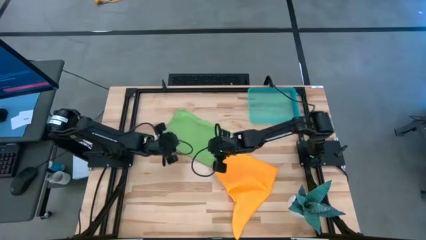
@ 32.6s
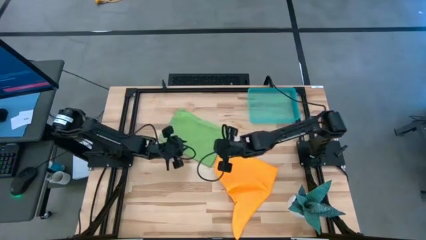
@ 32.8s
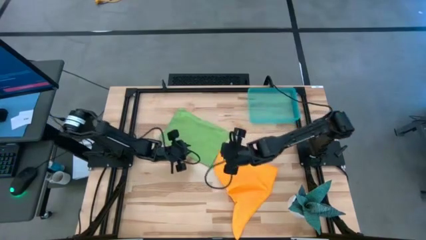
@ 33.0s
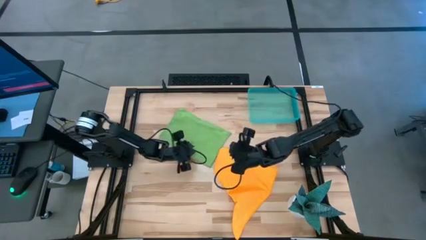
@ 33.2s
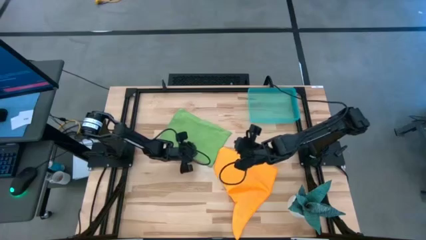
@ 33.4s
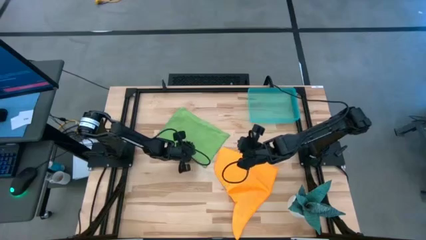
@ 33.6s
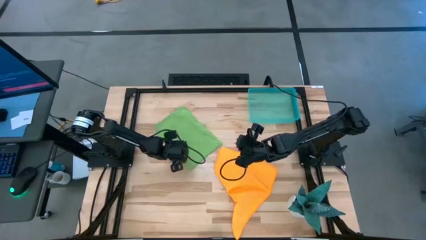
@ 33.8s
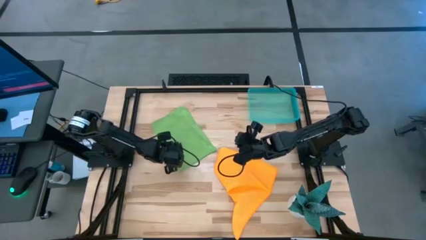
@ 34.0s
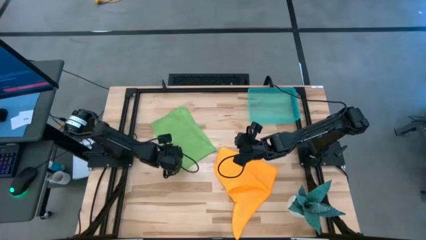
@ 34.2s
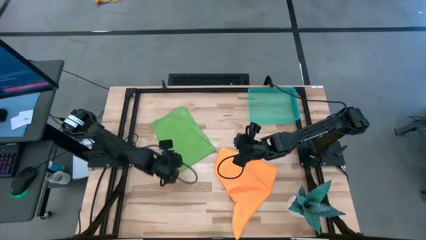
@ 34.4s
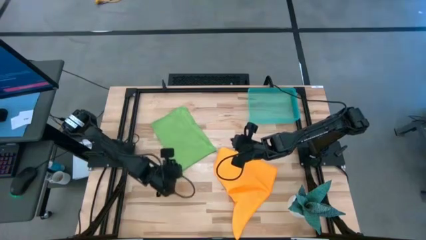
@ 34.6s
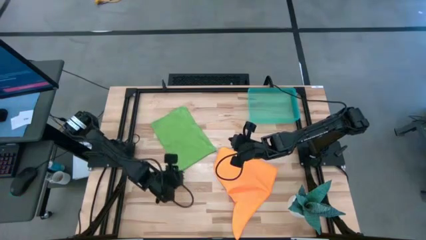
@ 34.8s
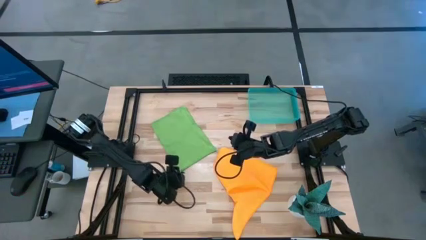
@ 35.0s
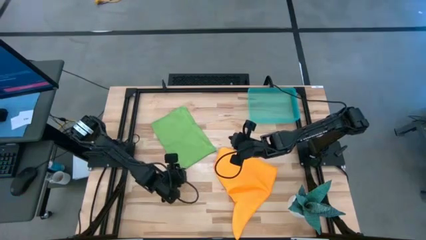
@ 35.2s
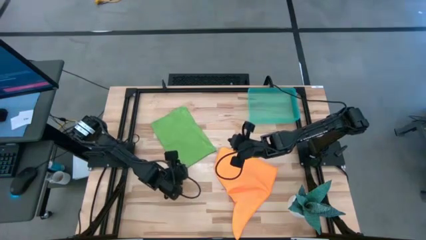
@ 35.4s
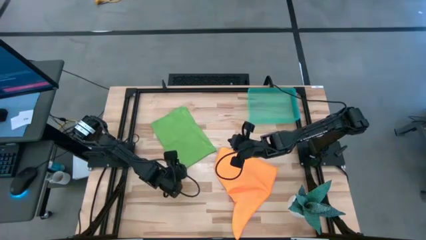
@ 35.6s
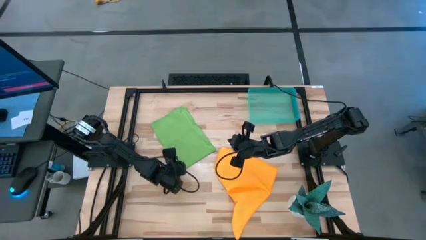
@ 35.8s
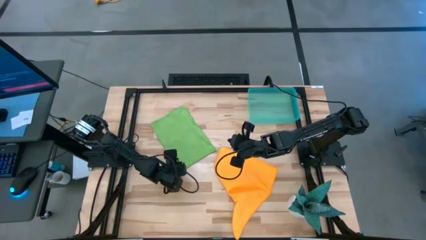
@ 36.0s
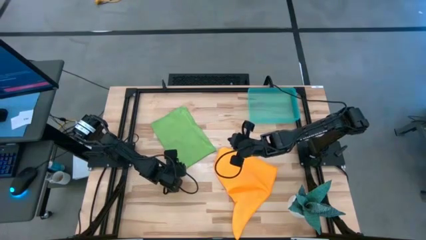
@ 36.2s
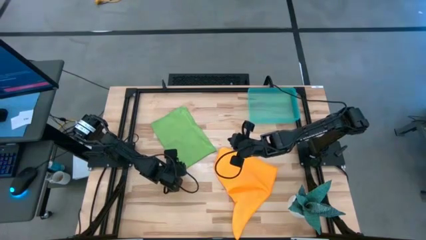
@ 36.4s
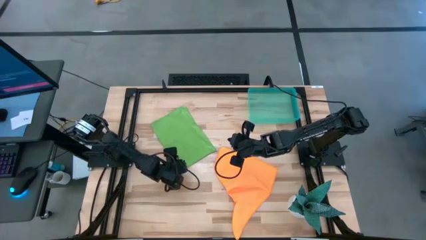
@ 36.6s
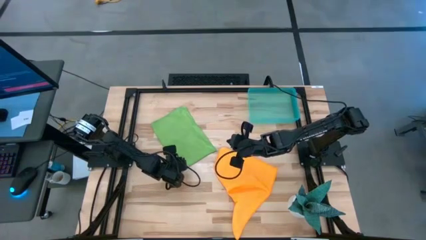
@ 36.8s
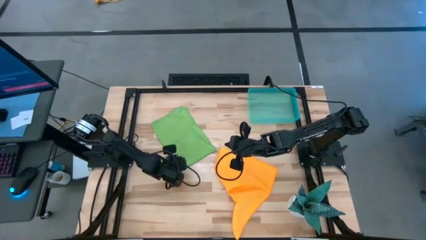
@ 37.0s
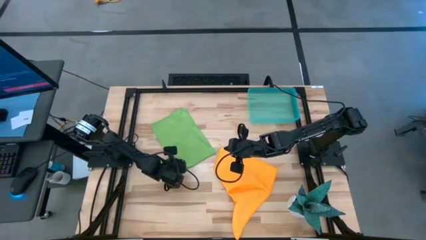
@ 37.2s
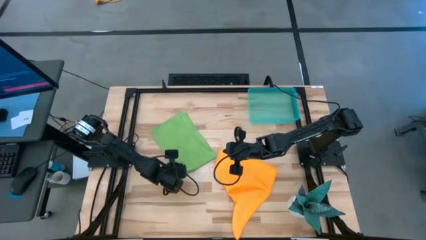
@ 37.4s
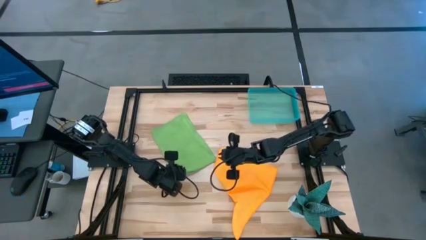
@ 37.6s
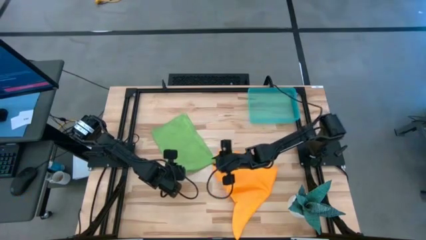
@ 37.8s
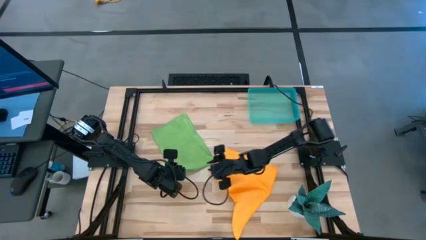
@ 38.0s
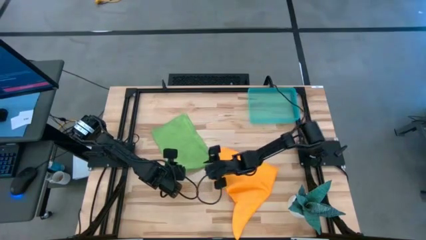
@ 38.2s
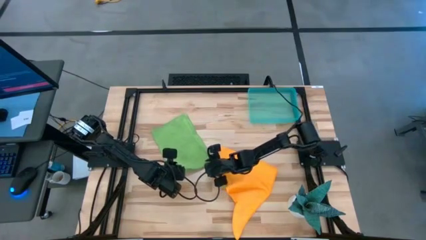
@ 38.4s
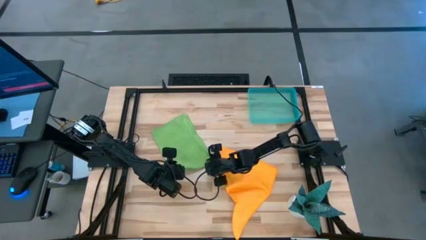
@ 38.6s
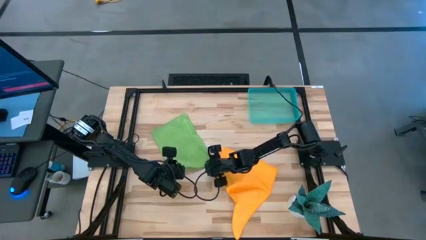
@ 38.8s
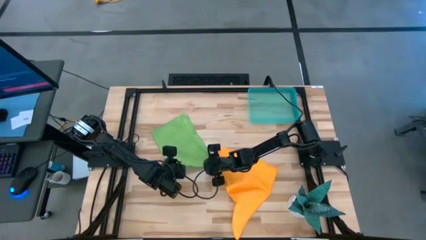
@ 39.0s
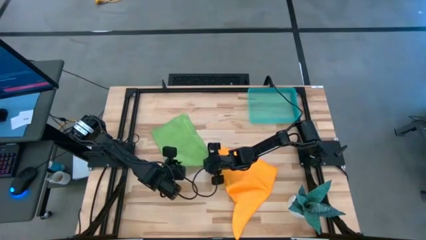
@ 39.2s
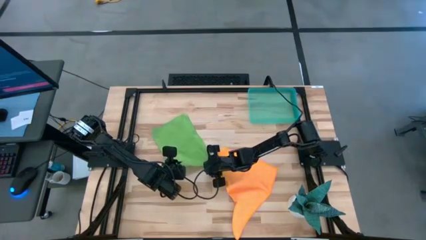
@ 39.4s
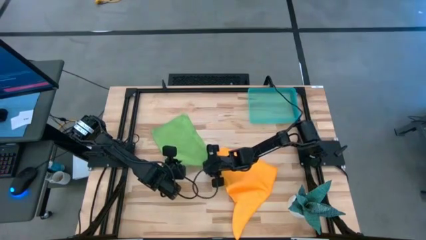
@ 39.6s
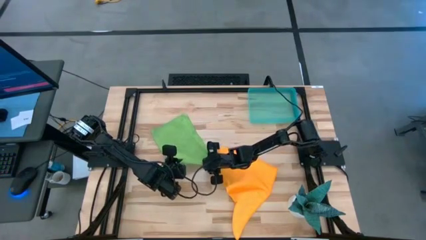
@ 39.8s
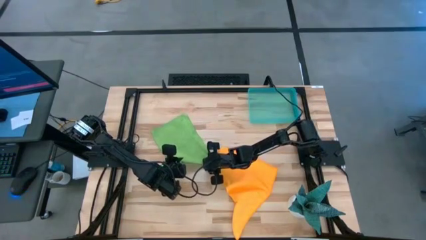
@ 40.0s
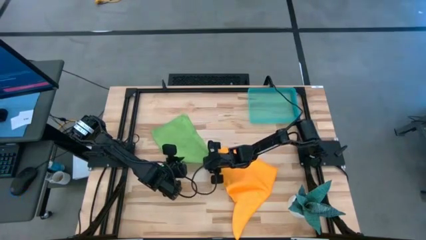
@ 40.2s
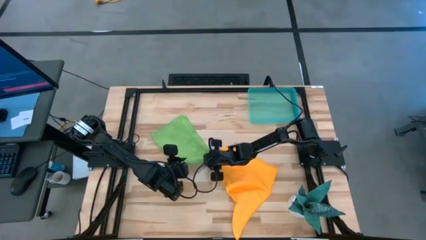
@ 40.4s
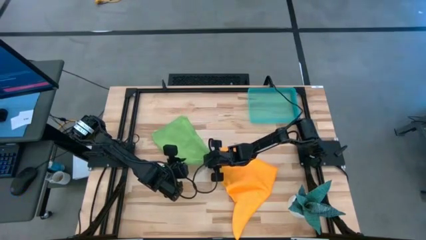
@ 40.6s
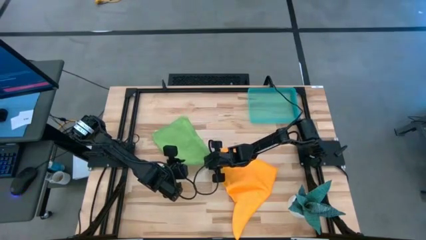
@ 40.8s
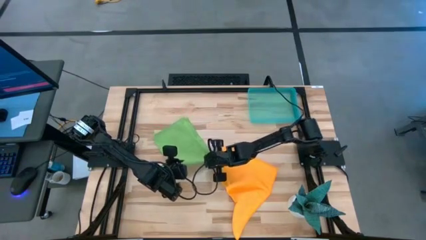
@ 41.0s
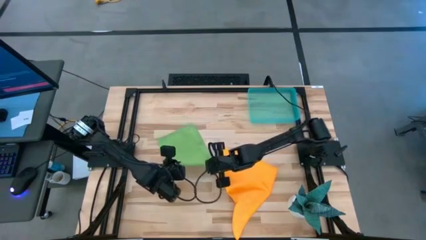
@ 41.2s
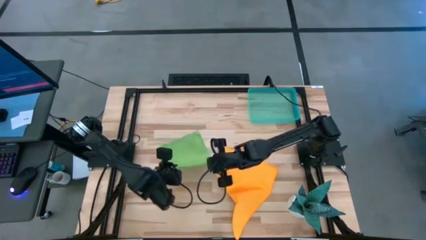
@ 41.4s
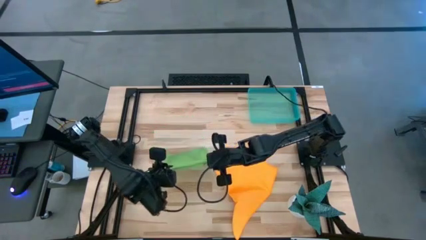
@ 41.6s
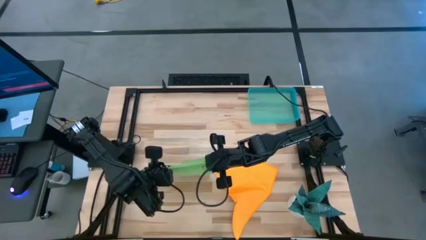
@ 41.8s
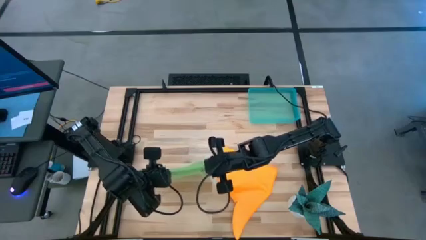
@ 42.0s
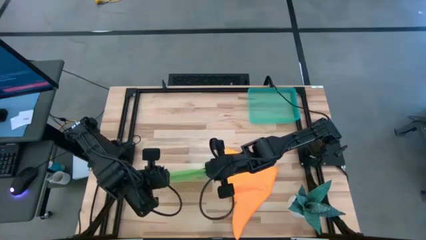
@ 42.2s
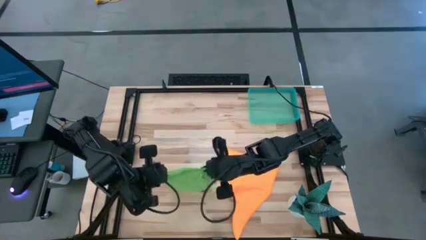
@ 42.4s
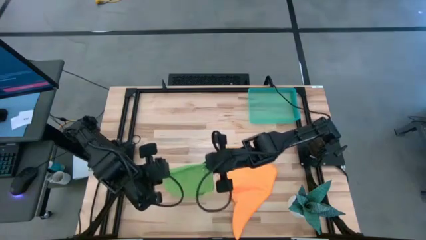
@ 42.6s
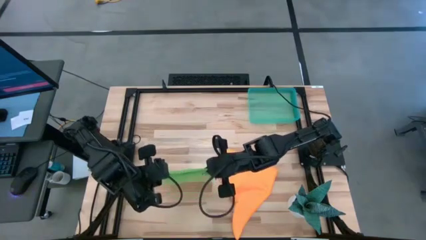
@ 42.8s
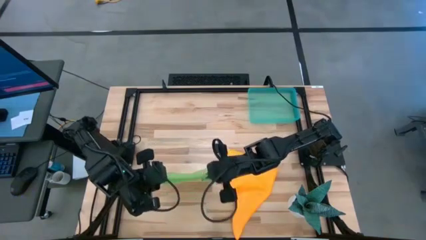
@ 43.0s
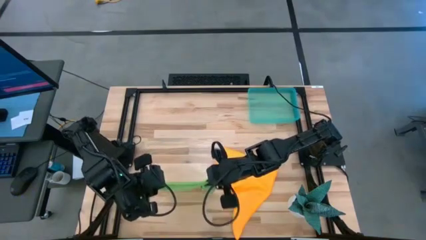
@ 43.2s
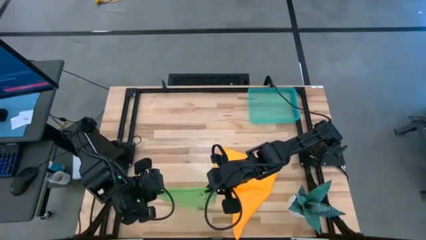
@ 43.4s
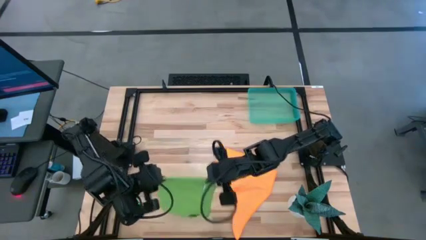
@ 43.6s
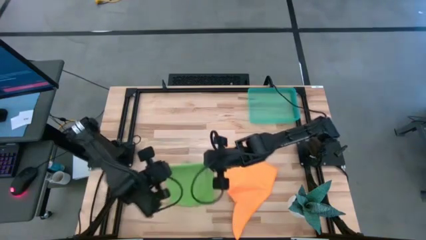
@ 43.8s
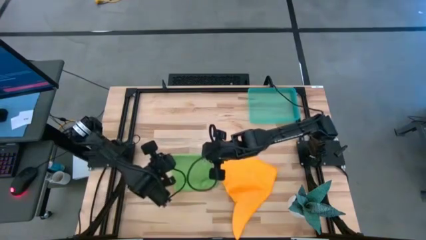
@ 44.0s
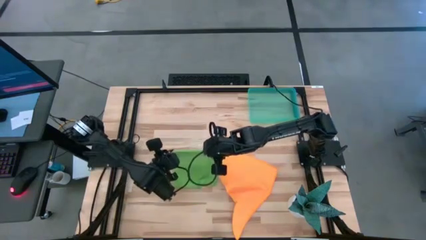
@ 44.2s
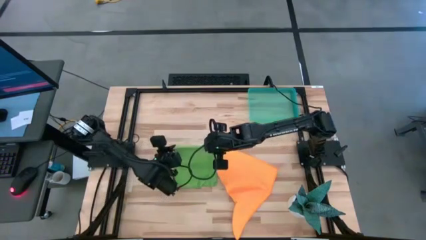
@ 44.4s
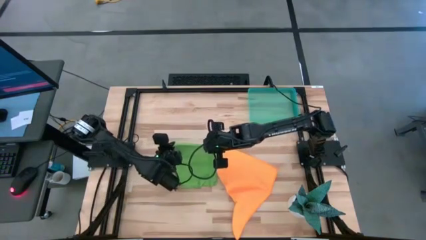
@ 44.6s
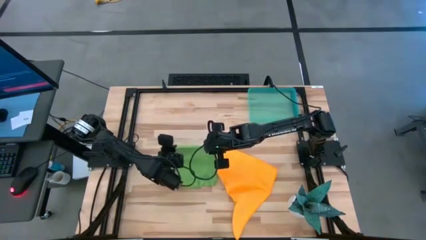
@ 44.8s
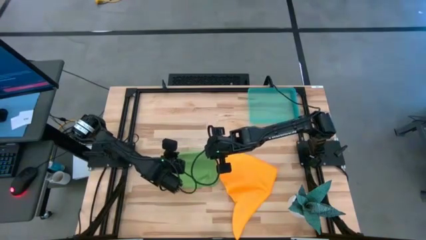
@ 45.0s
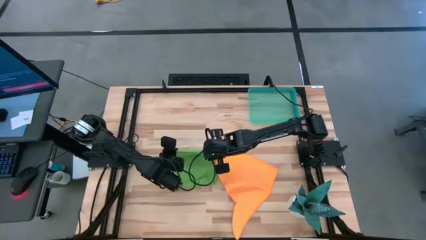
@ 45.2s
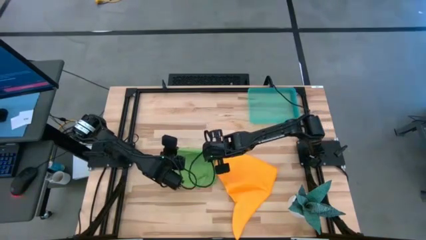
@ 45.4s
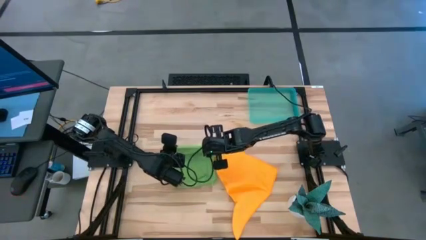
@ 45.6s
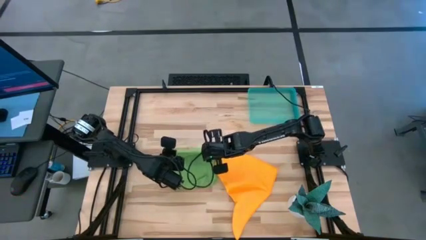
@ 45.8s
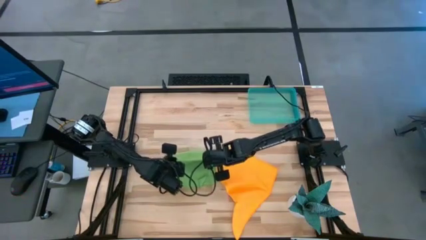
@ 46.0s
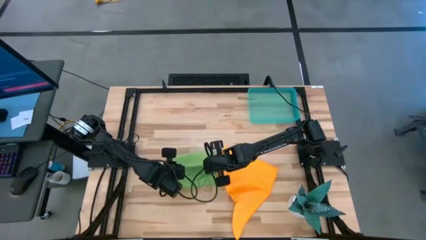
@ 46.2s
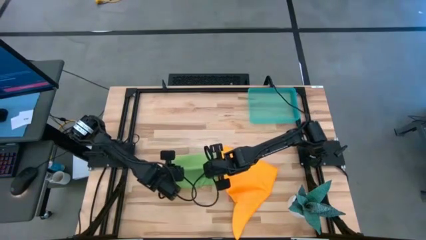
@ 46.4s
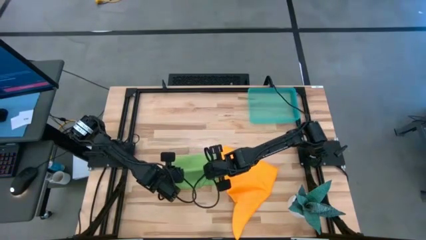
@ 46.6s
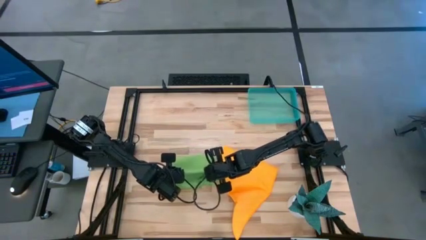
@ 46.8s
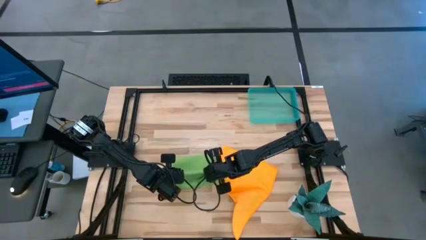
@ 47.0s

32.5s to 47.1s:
Task: Roll microfiber towels into tight, uniform cylinder then place into a basket
Fold the green microfiber towel

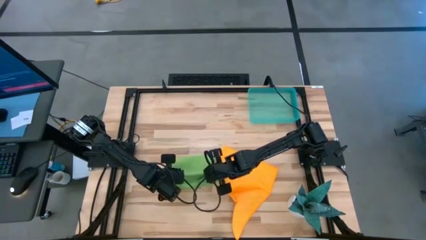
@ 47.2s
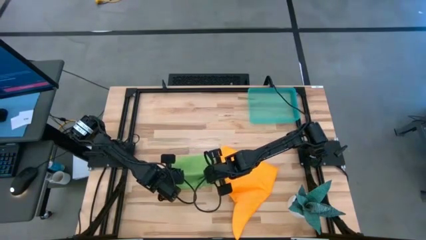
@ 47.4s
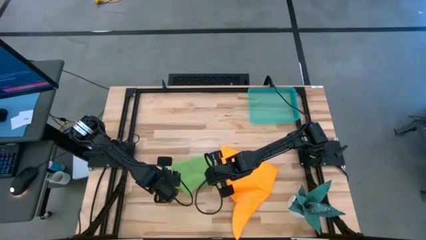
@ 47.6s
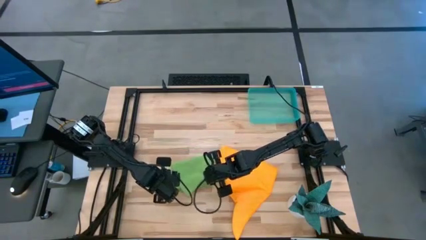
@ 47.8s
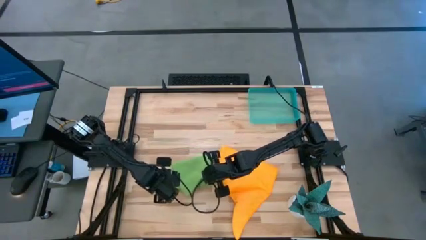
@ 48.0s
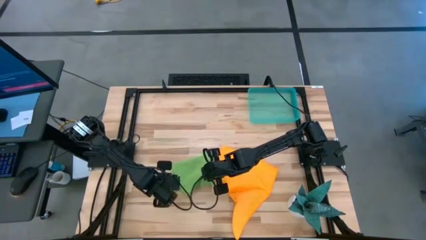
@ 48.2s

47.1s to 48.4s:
Fold the green microfiber towel
